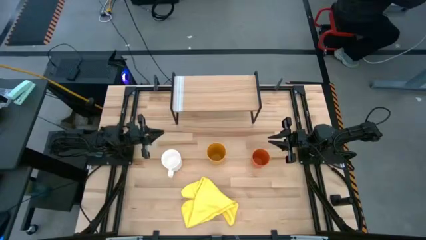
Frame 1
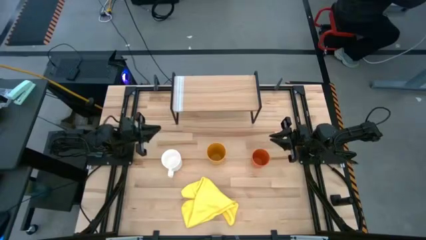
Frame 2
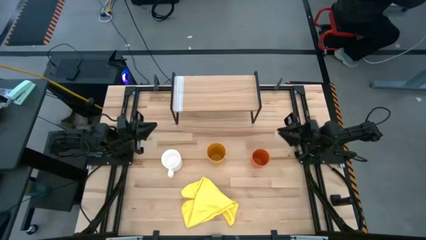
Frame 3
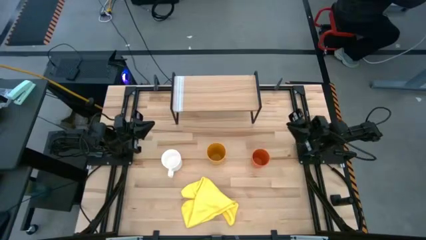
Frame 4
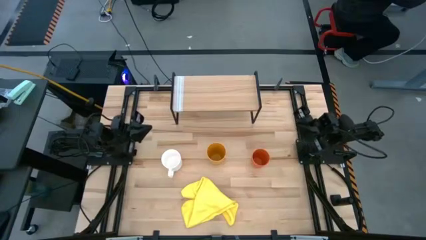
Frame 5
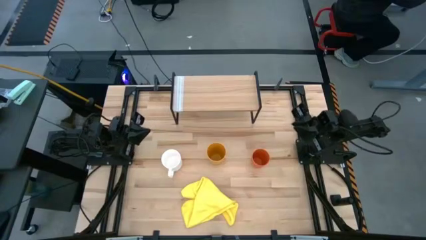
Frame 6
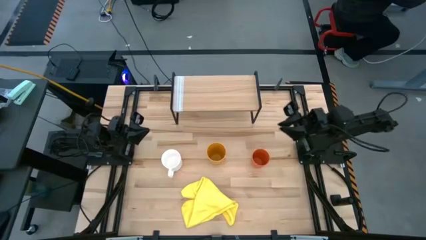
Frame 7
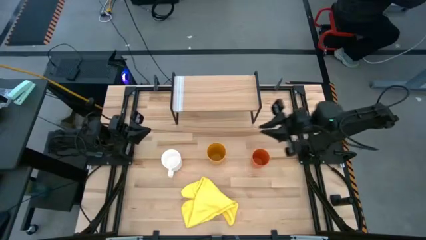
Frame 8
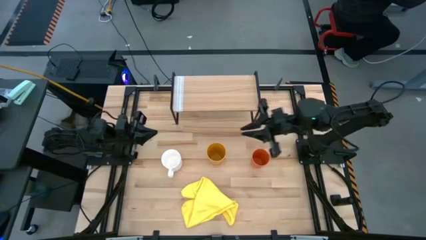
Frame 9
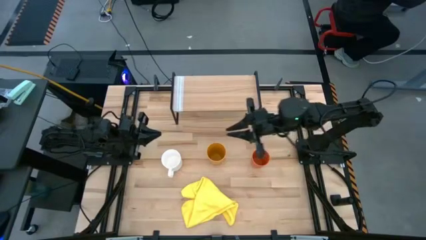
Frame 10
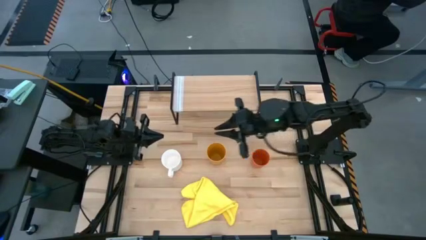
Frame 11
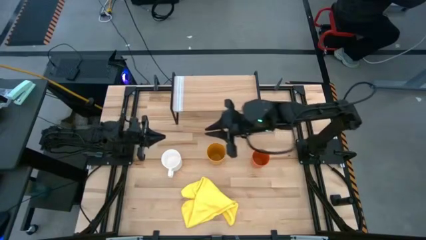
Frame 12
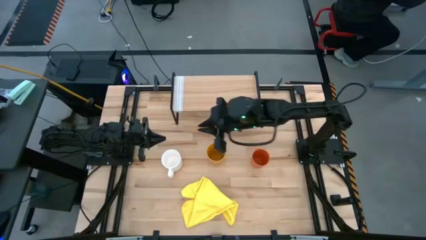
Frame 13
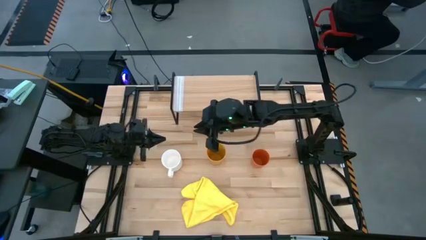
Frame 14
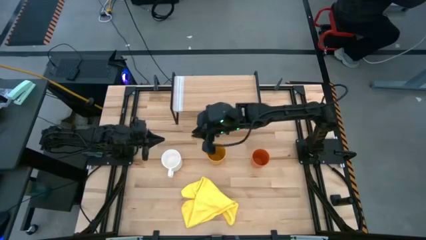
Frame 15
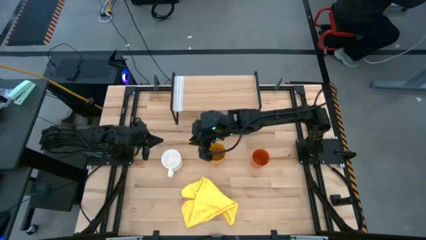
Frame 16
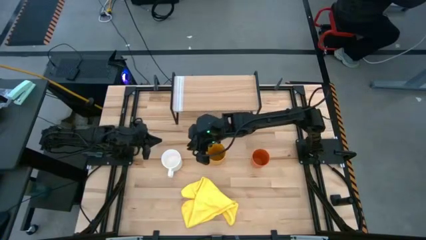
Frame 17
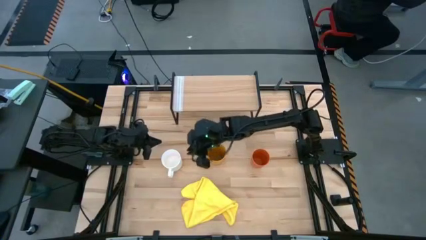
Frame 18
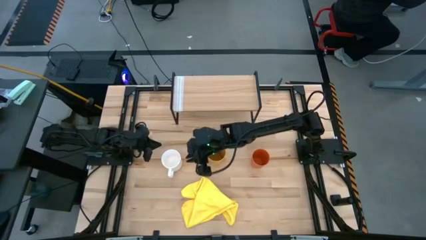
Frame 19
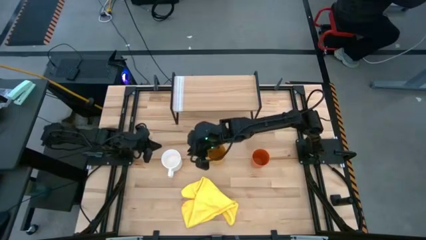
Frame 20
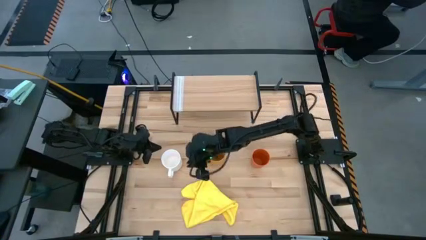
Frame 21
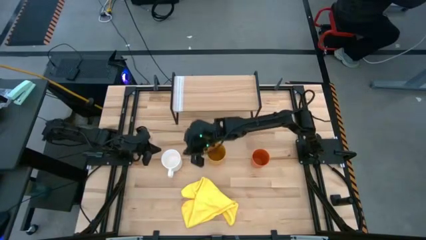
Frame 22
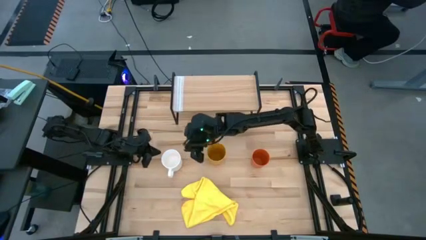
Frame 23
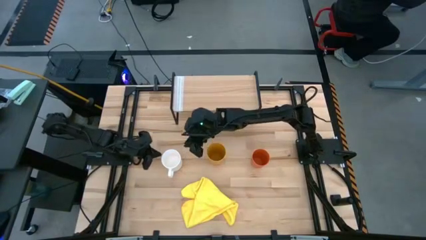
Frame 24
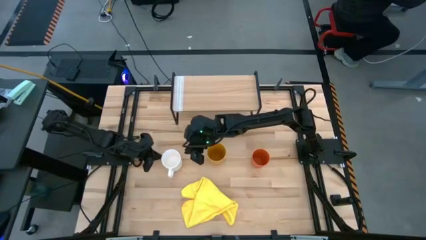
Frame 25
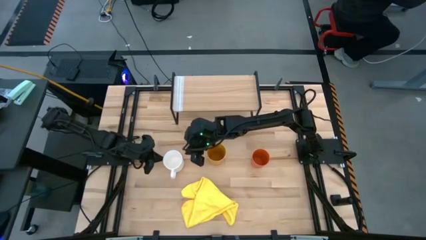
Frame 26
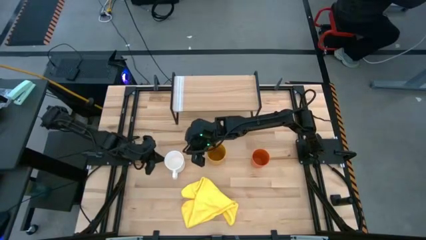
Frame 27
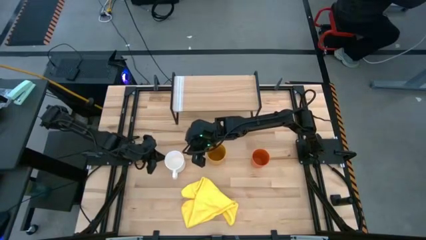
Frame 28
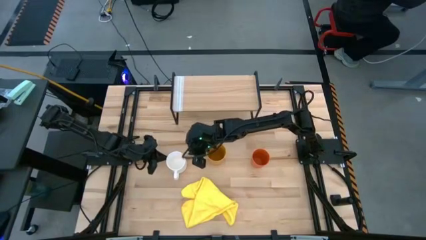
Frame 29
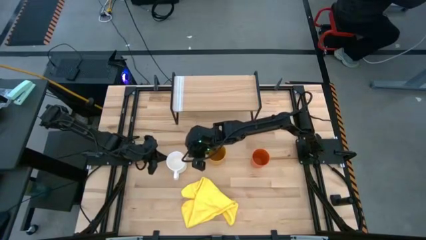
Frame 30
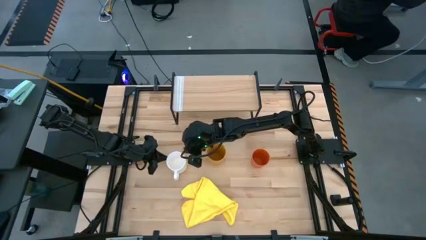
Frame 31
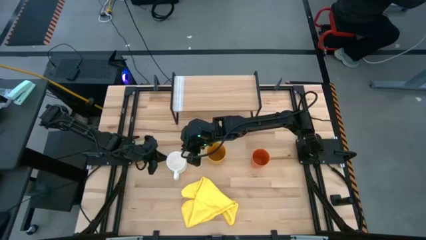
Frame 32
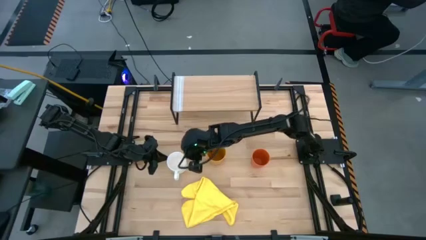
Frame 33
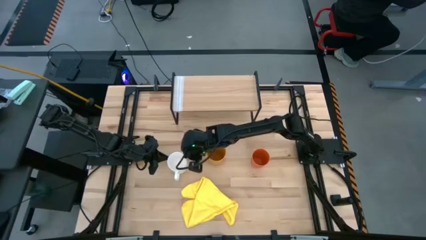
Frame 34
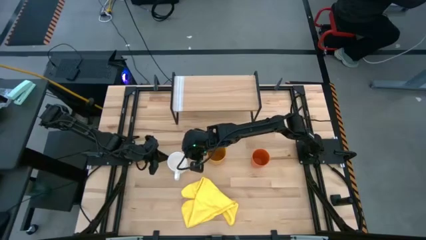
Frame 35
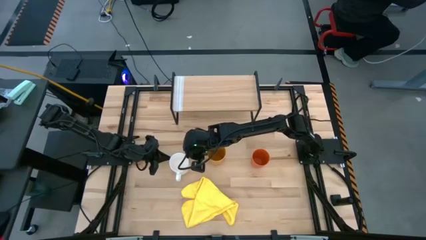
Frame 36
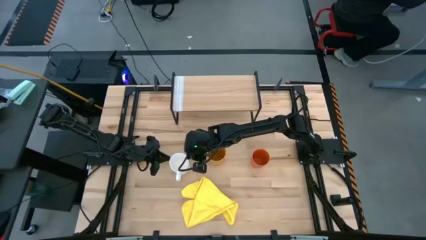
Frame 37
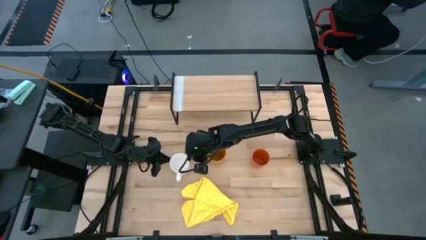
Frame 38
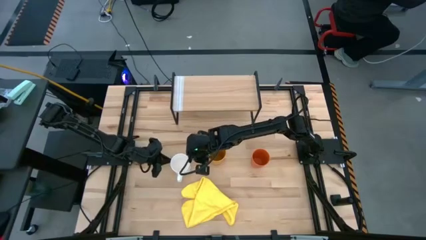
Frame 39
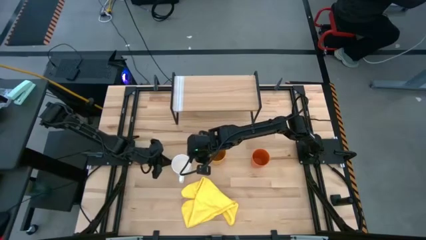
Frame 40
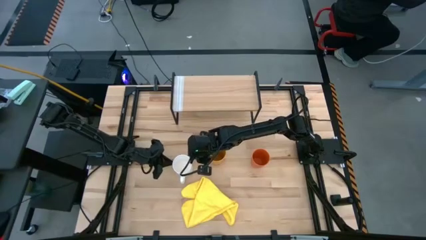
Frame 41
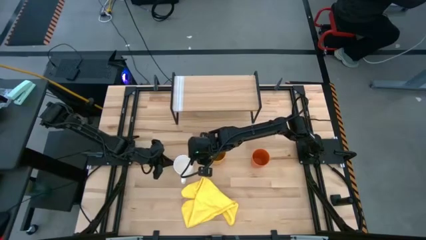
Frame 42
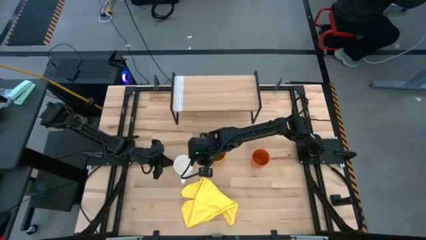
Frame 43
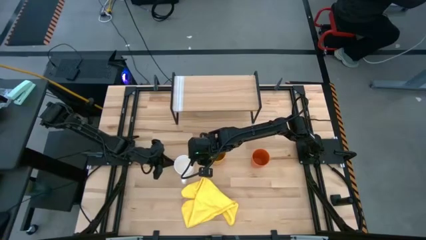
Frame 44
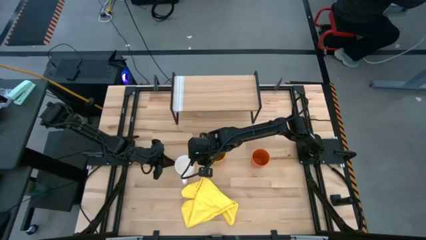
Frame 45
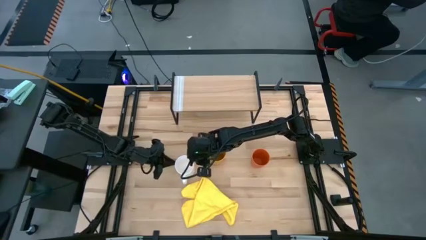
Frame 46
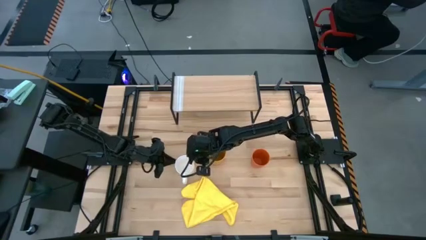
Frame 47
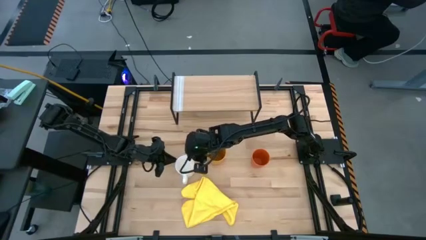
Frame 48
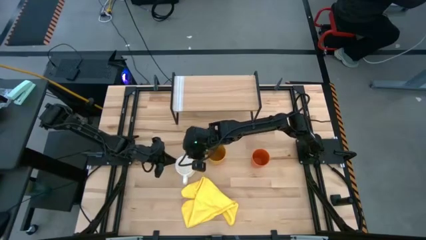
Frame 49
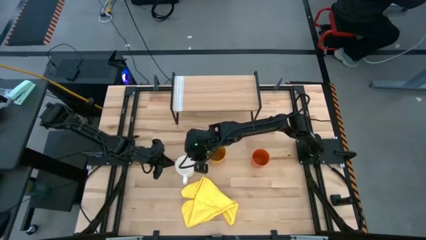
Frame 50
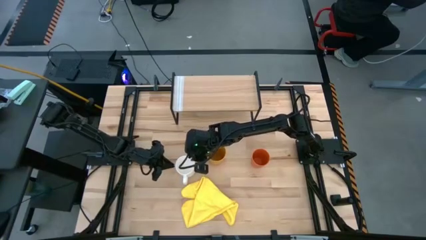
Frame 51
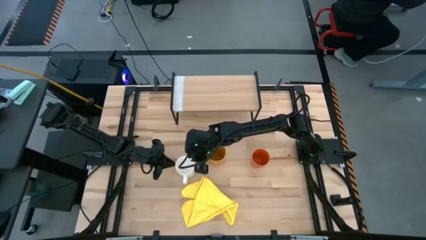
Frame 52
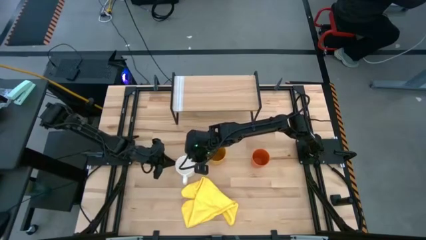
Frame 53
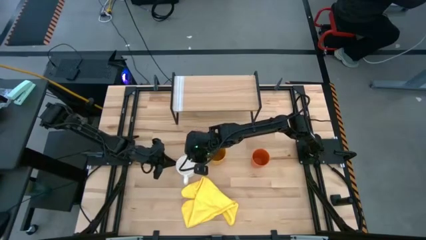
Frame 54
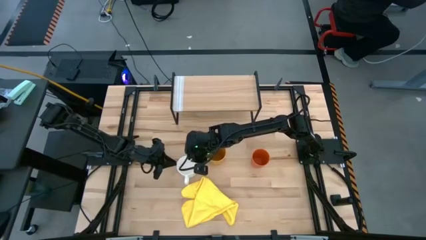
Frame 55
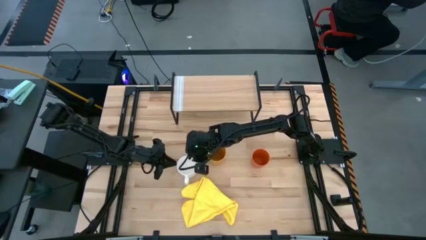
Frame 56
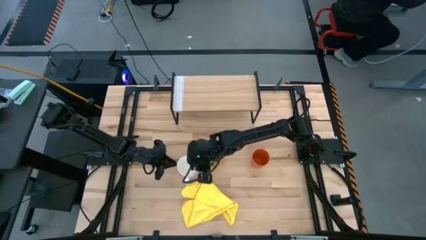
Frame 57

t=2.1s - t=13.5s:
Task: Stack small to large cups/mugs on shelf
Put the white mug on the shelf

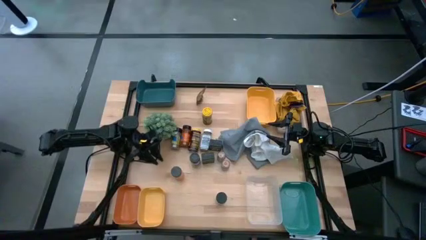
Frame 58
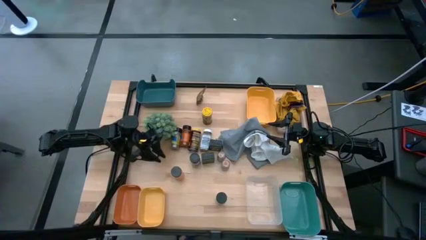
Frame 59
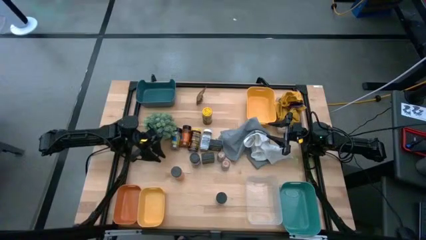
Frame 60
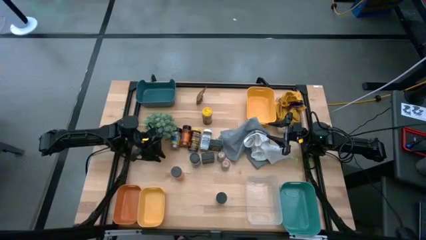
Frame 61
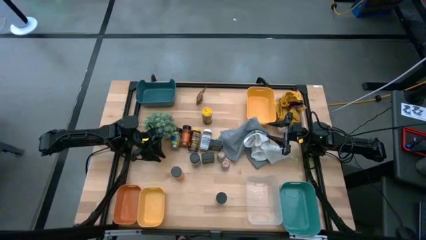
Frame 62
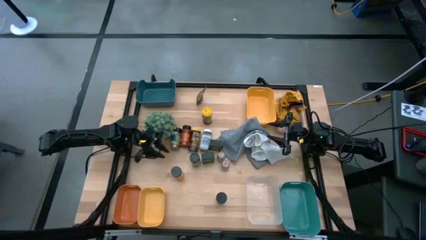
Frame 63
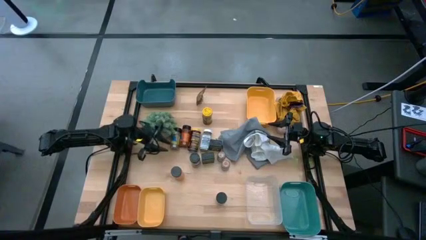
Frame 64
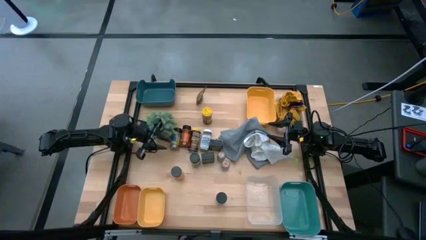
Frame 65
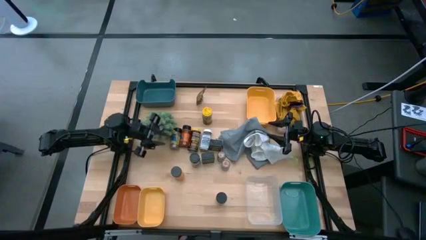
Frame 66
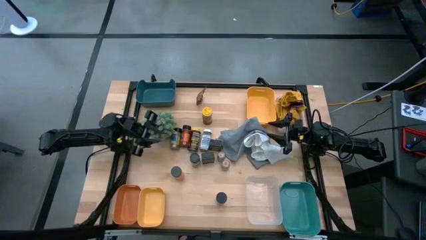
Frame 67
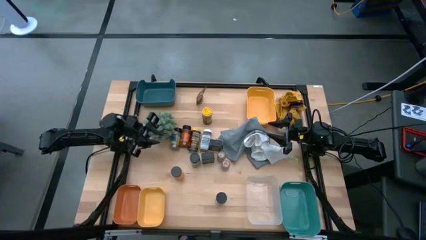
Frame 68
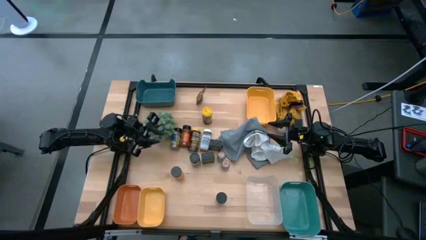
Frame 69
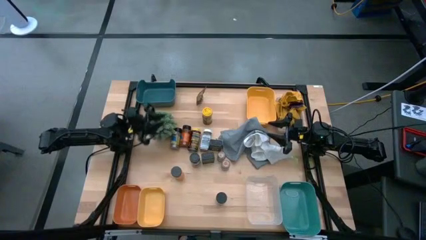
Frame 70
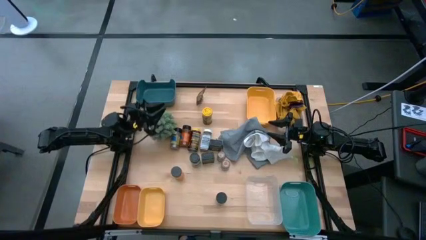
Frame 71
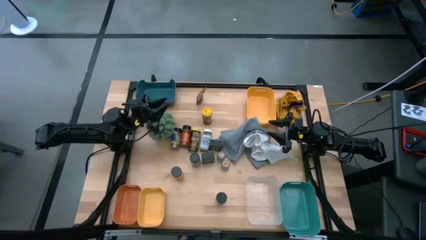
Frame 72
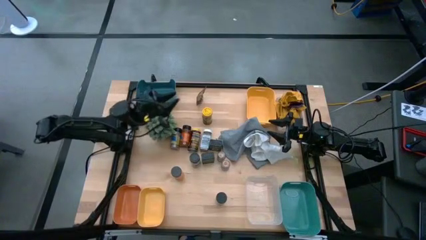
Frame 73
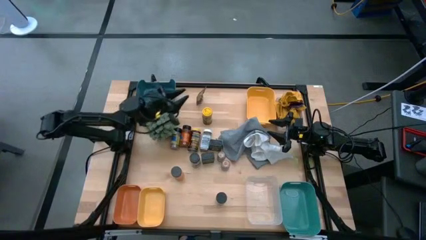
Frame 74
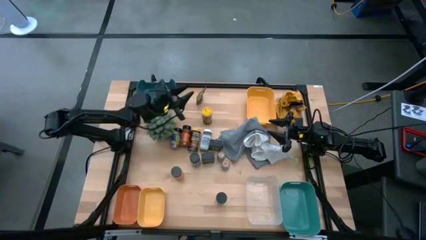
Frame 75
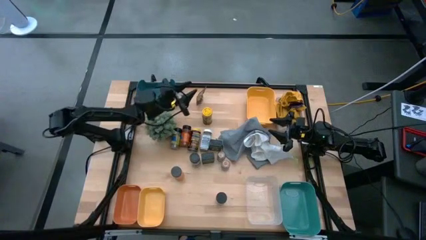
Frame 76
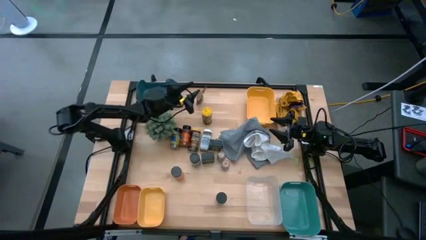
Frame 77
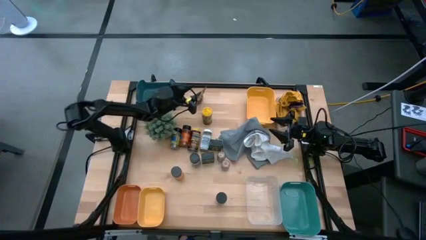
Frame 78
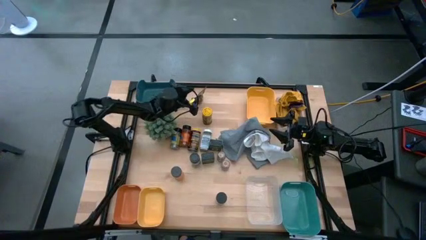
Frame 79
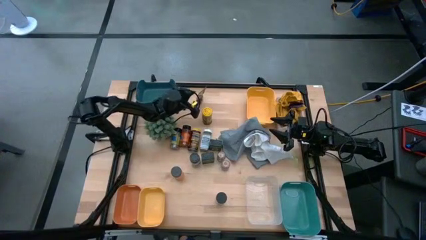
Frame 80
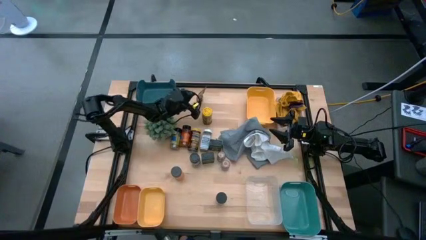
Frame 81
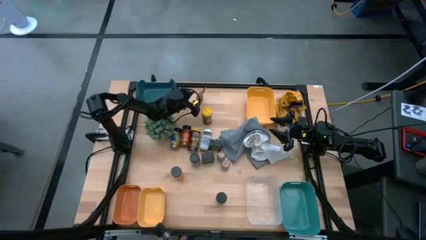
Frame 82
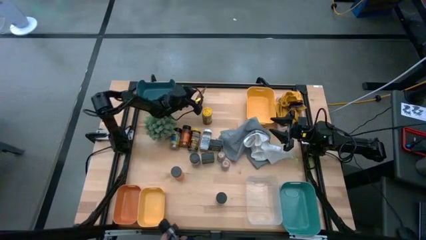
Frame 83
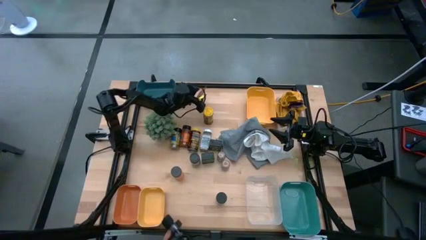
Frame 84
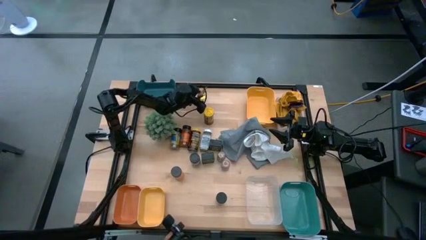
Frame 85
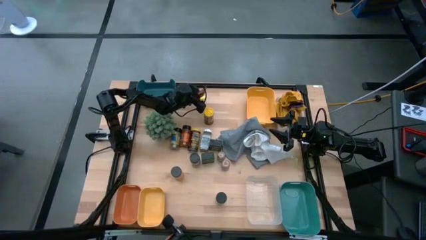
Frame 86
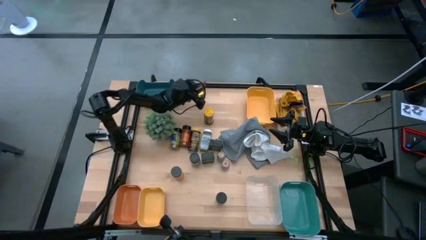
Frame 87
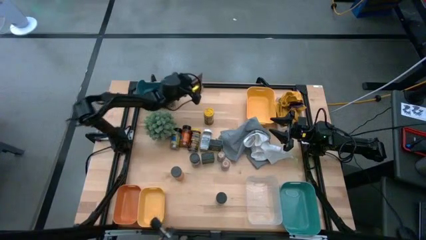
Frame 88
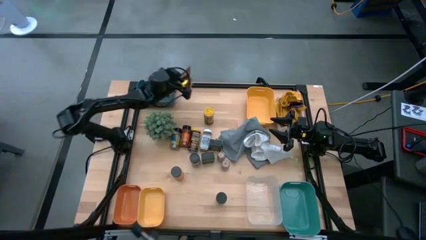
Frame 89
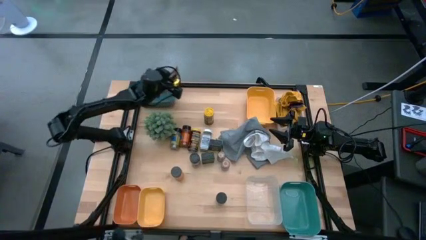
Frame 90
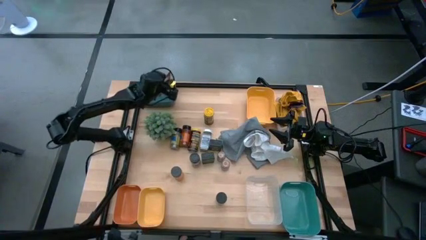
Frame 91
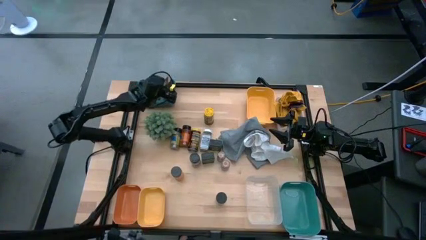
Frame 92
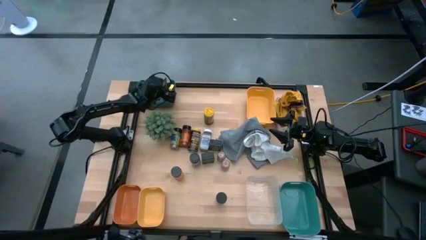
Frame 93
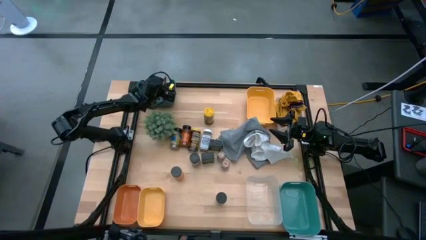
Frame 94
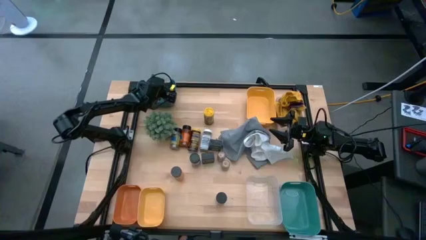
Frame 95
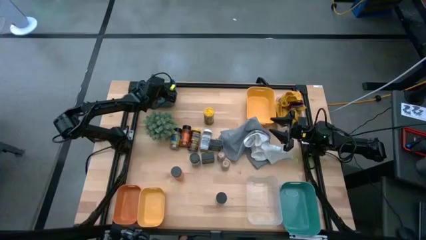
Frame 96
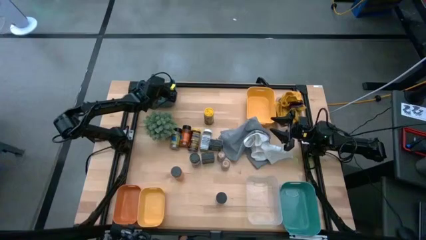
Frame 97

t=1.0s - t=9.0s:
Task: Sort spices by type
Put the orange seasoning pack into the dark blue bin
